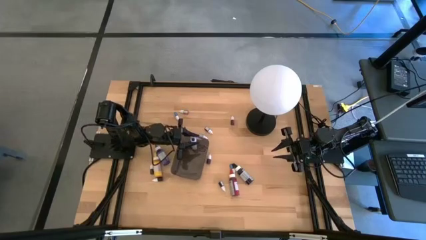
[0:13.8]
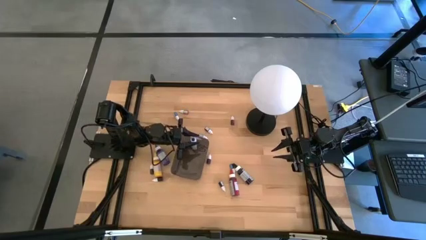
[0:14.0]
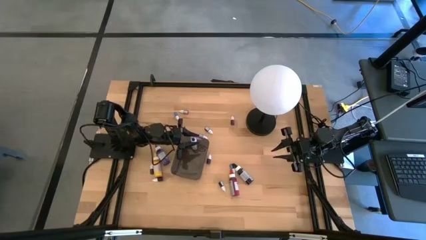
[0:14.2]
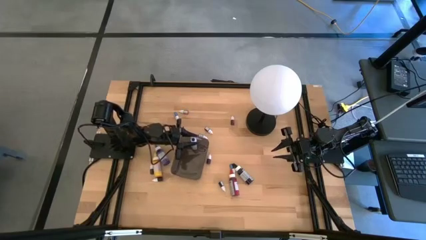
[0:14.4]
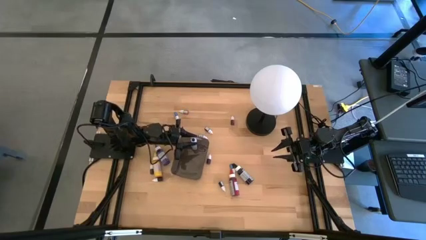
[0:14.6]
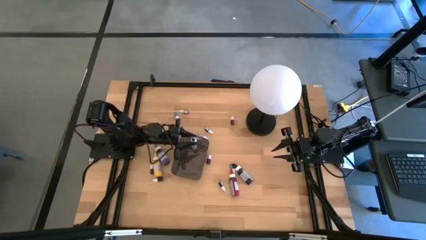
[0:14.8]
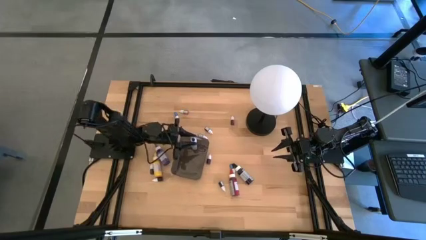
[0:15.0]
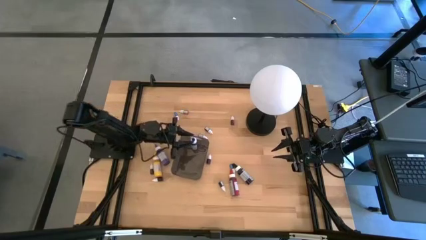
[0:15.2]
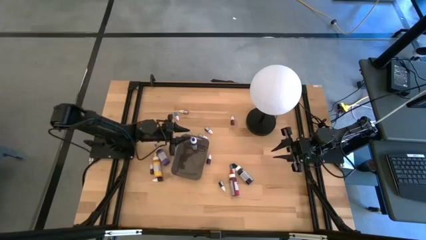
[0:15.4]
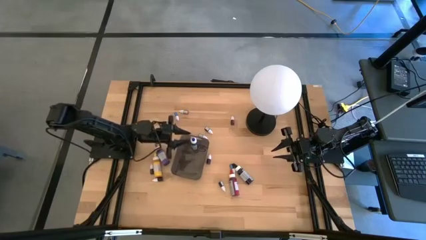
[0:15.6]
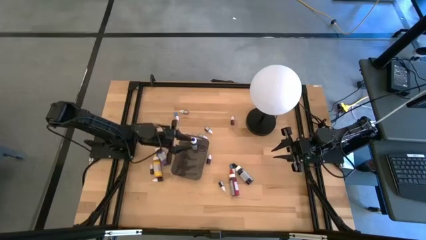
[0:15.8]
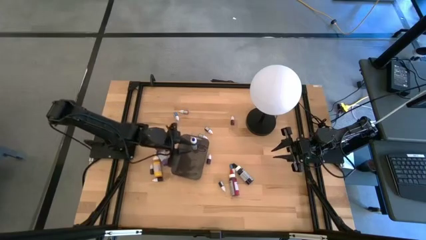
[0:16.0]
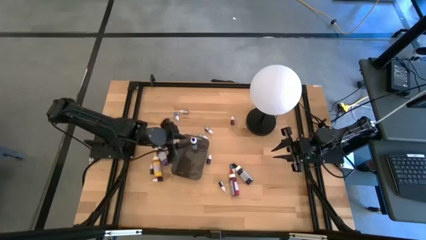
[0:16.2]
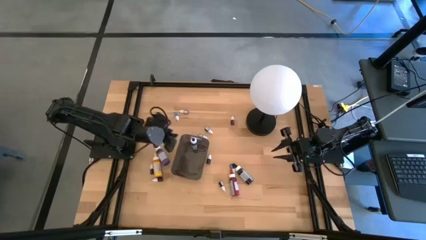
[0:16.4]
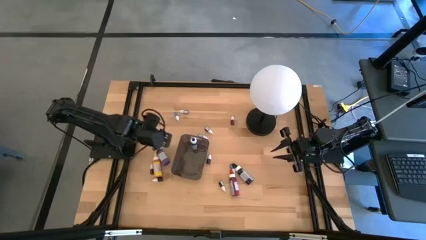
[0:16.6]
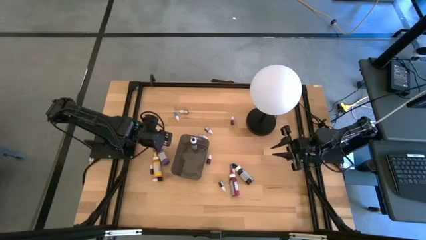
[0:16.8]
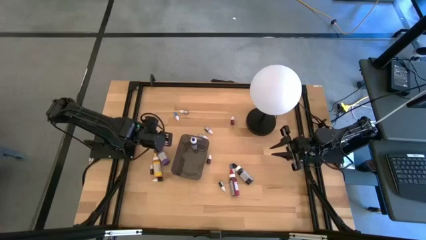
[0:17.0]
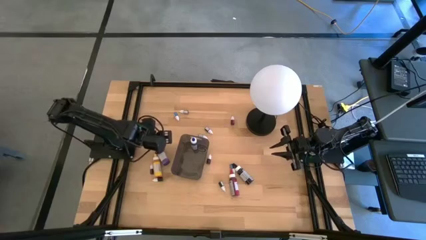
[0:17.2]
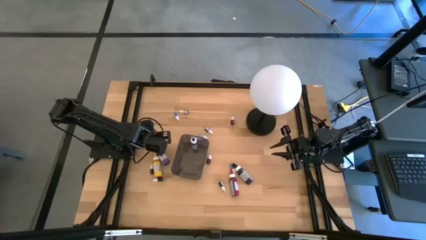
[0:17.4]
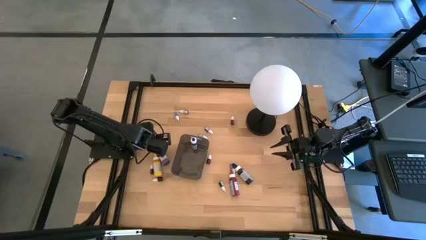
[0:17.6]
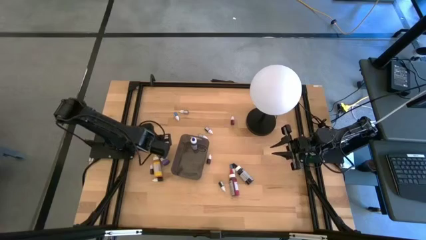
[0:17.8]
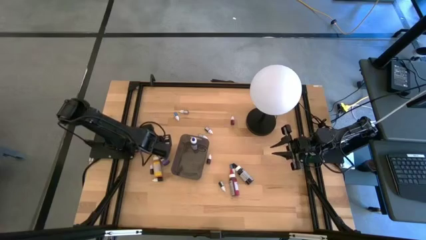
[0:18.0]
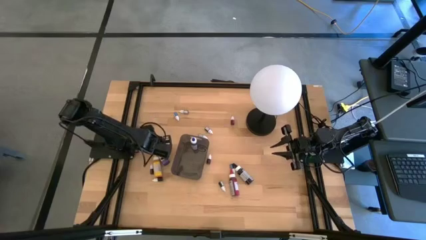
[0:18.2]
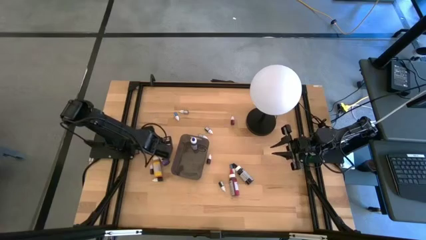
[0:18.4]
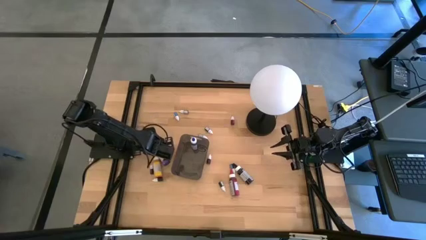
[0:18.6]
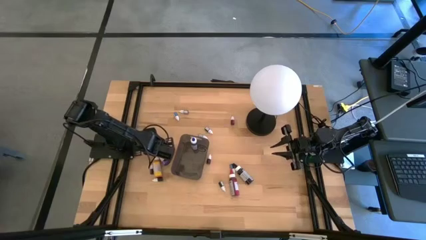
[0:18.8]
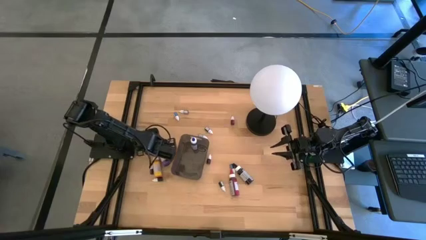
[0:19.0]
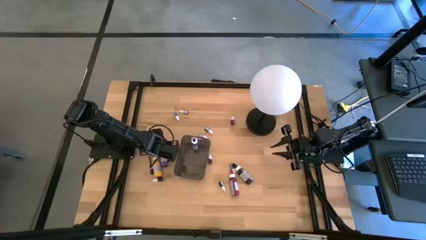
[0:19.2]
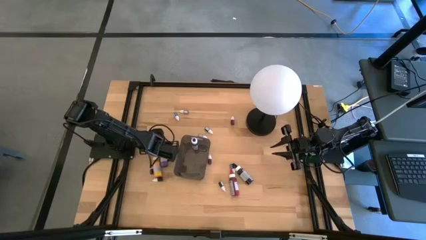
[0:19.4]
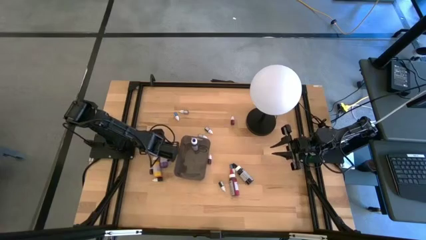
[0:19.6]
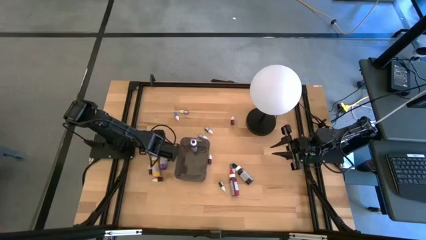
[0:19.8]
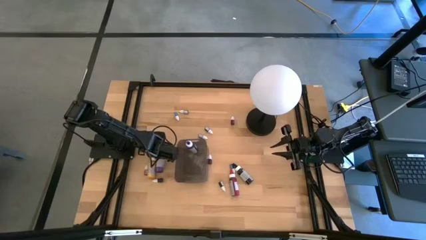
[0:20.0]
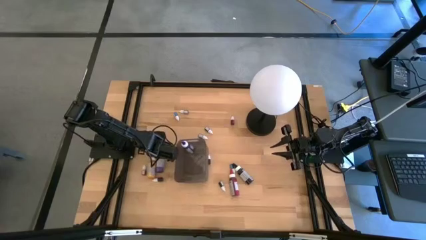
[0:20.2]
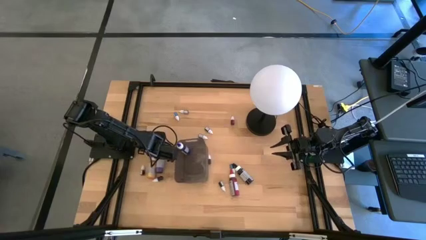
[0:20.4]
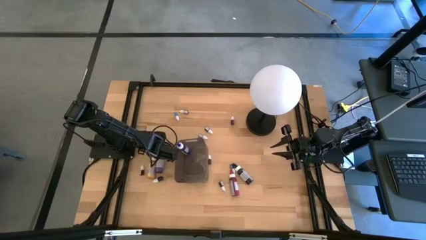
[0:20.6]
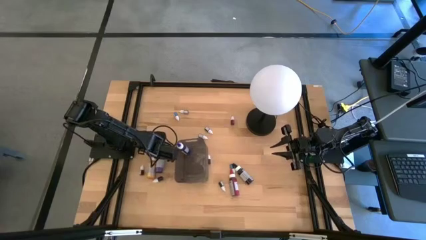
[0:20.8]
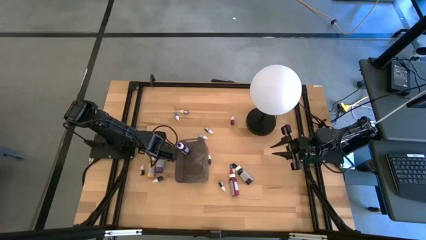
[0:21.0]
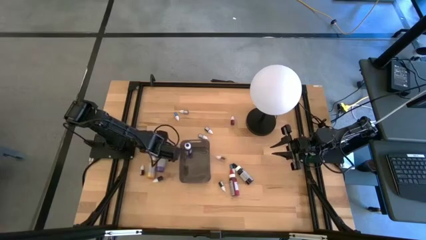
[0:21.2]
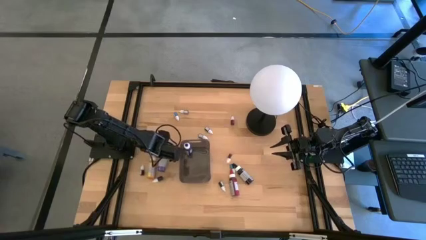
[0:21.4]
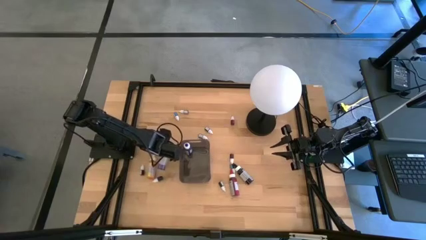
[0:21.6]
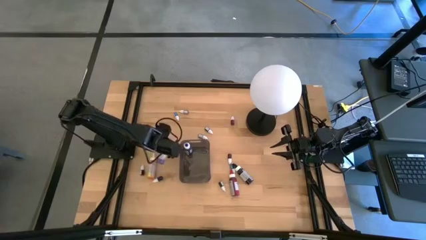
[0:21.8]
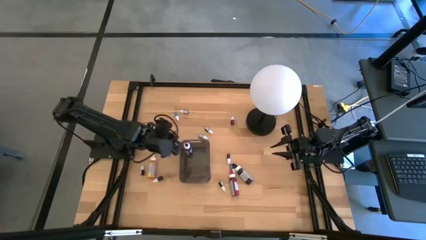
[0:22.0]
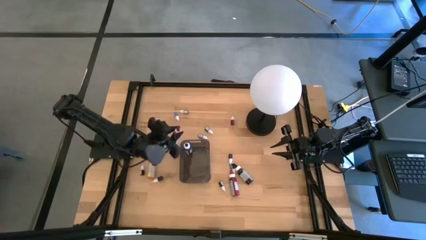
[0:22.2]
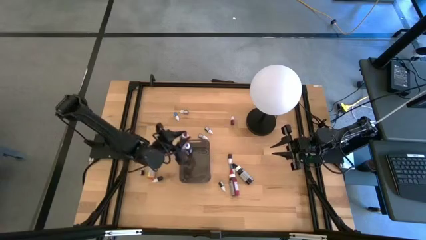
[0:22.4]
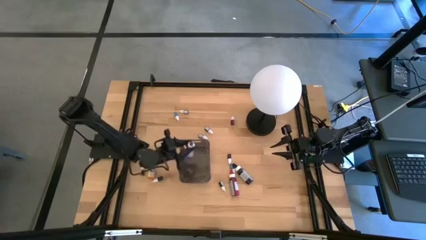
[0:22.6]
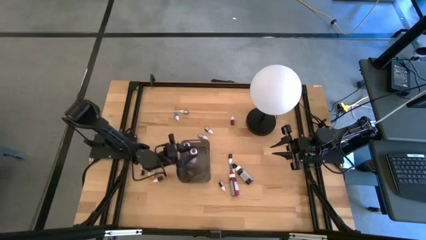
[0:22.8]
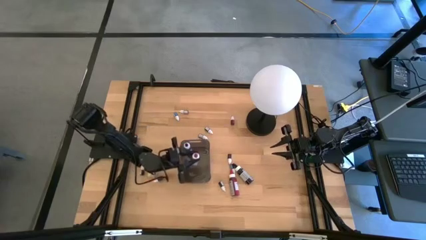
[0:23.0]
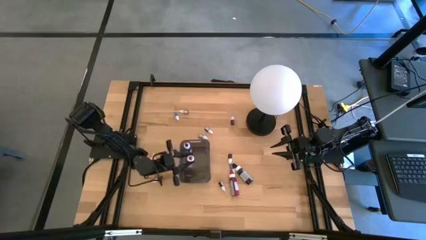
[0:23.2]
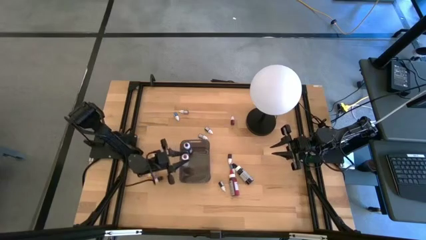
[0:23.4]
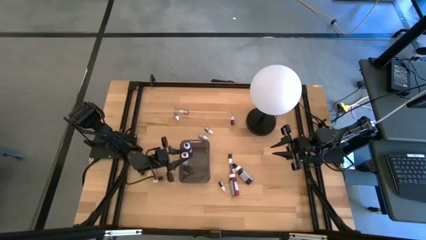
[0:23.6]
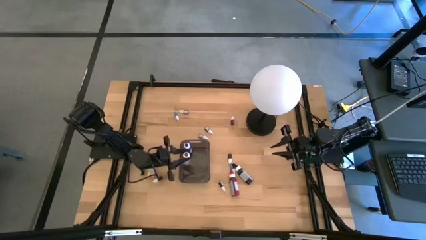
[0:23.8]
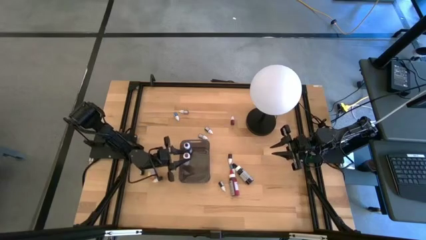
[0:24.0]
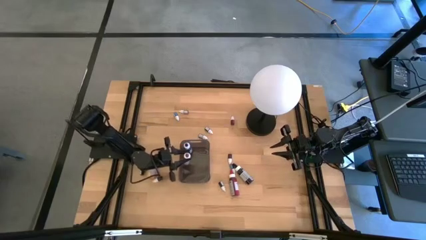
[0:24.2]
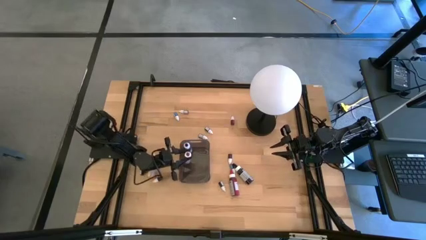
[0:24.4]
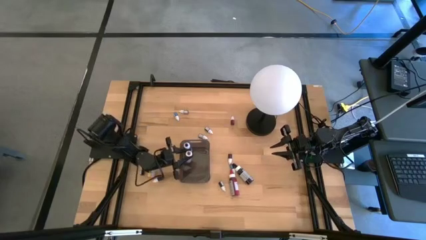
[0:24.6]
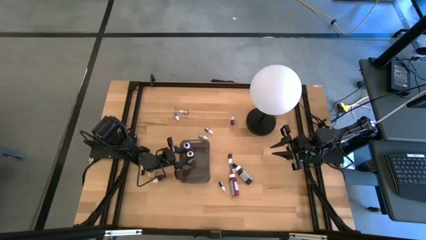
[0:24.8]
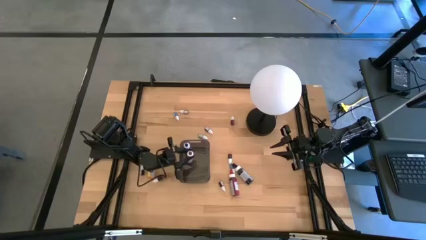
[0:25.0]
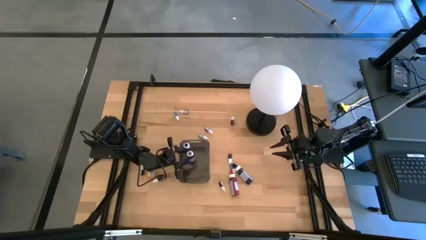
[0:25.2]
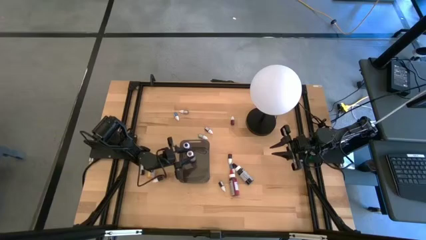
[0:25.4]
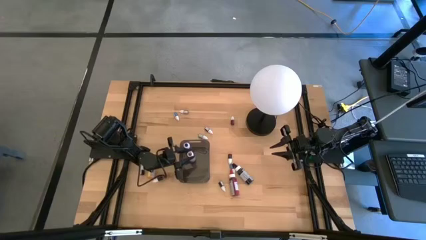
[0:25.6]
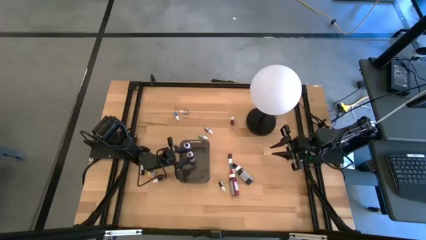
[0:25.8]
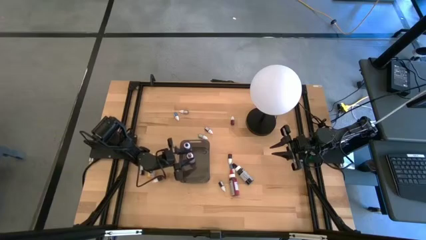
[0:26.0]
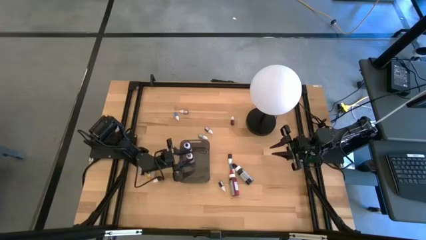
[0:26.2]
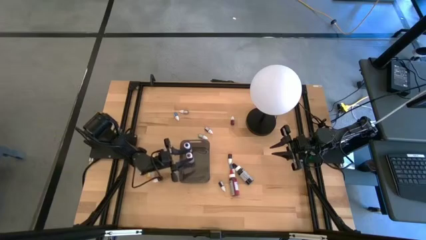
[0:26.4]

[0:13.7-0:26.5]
Task: Pick & Place food coloring
Put the large purple food coloring bottle into the black bin
